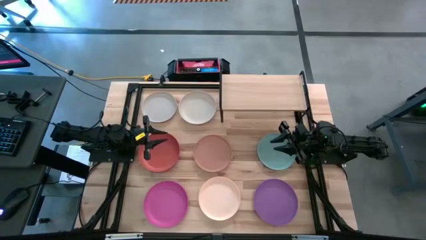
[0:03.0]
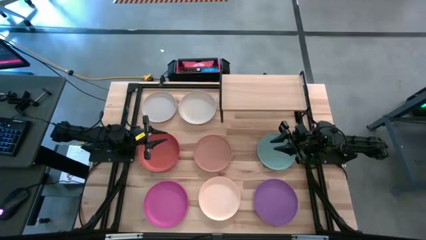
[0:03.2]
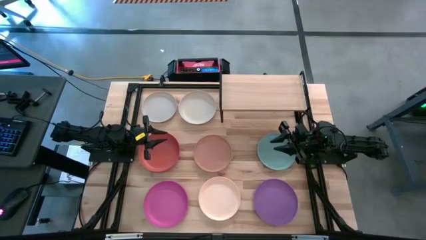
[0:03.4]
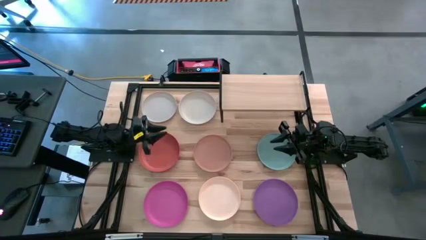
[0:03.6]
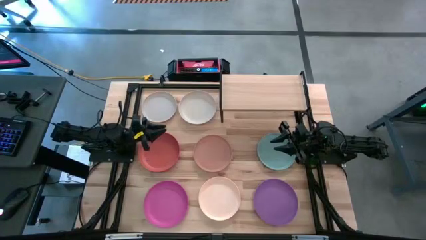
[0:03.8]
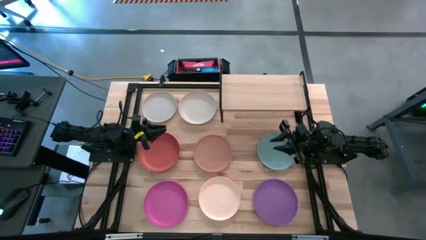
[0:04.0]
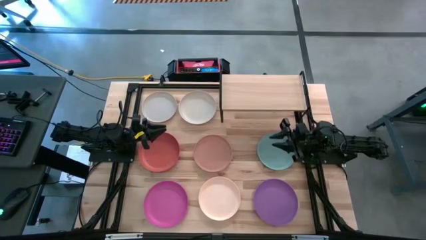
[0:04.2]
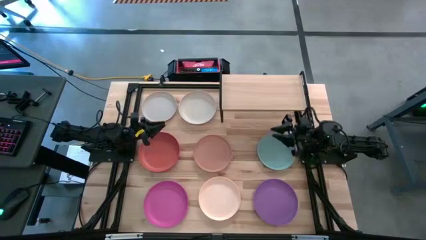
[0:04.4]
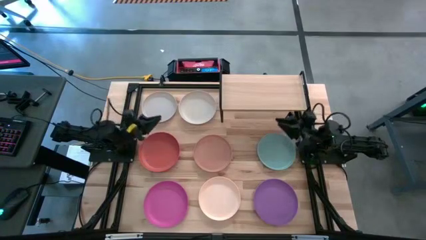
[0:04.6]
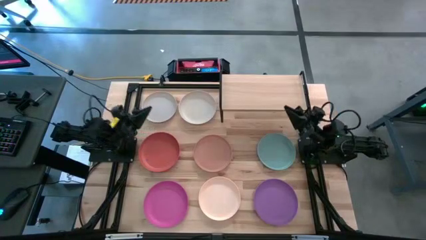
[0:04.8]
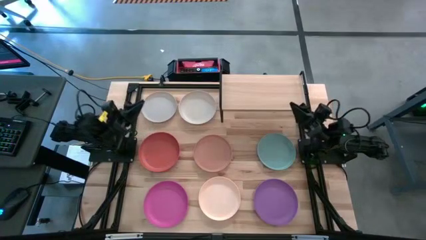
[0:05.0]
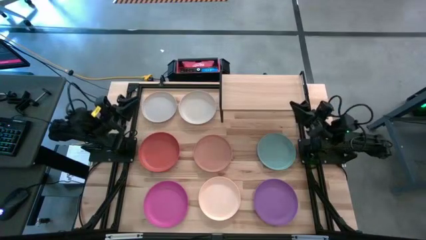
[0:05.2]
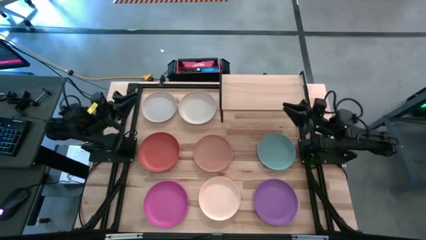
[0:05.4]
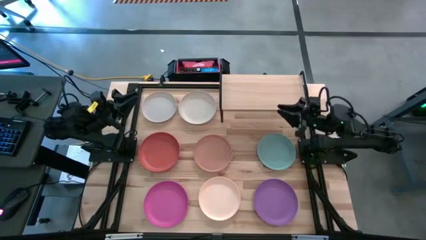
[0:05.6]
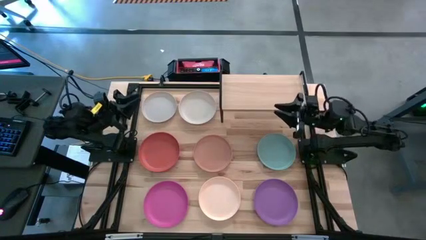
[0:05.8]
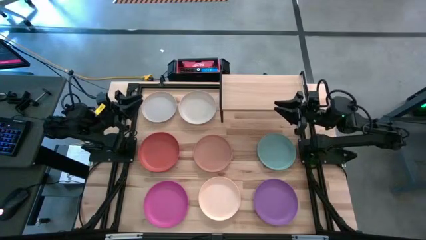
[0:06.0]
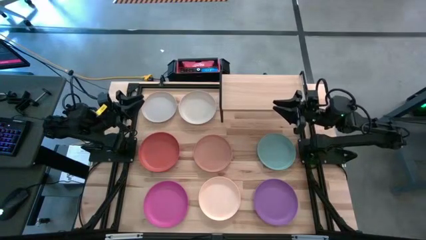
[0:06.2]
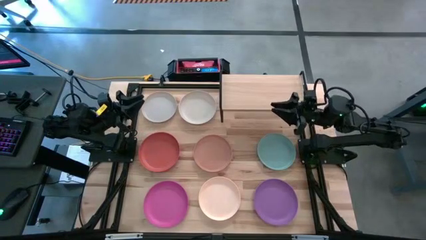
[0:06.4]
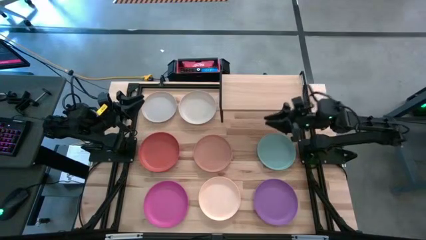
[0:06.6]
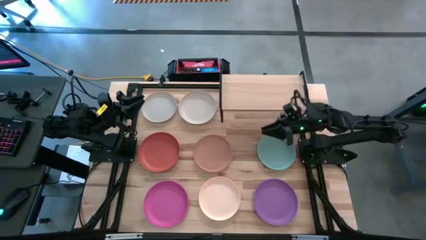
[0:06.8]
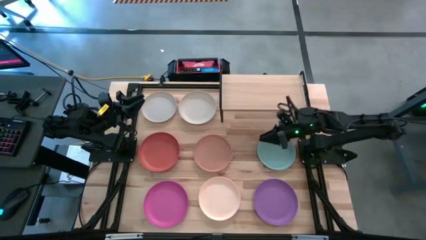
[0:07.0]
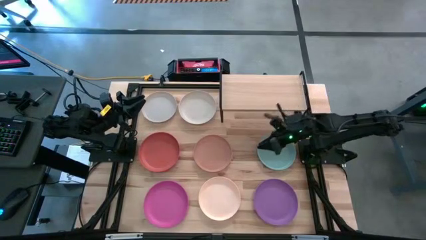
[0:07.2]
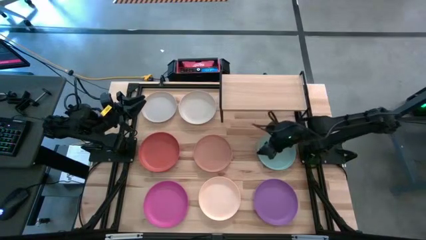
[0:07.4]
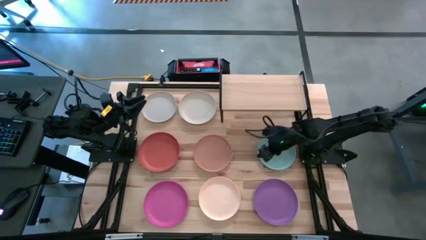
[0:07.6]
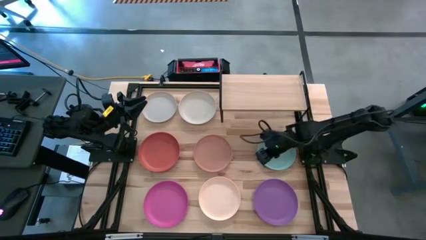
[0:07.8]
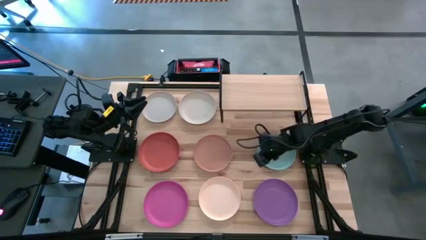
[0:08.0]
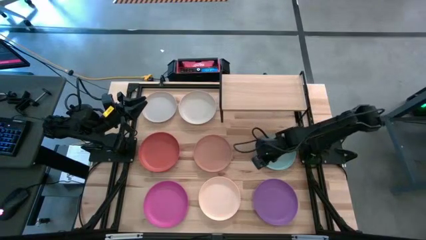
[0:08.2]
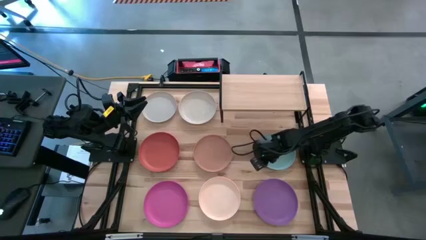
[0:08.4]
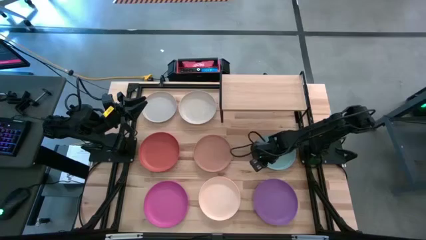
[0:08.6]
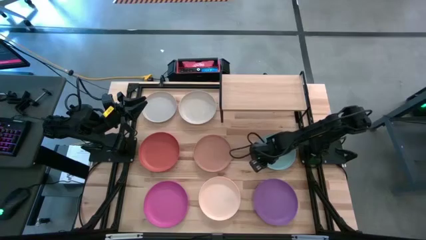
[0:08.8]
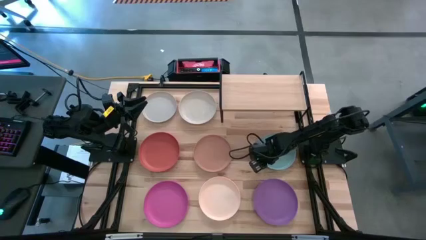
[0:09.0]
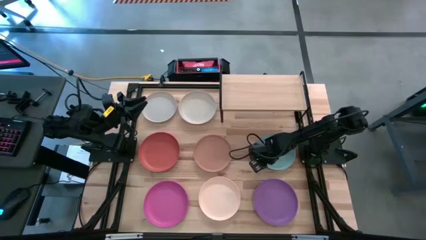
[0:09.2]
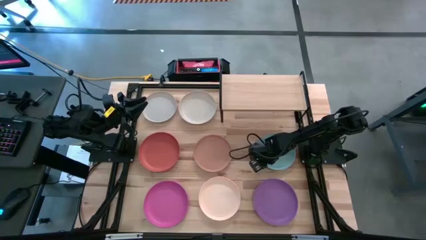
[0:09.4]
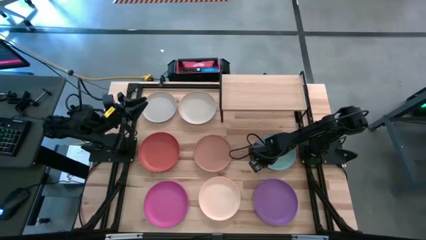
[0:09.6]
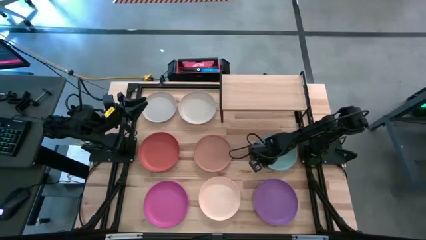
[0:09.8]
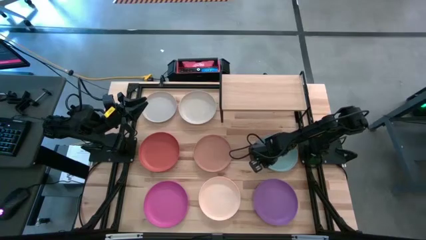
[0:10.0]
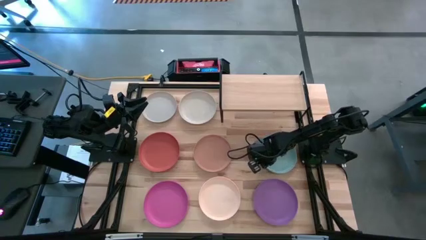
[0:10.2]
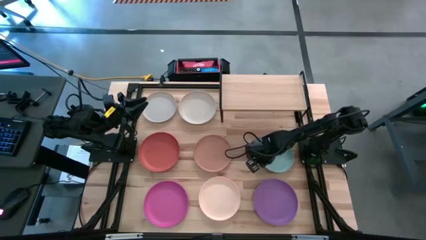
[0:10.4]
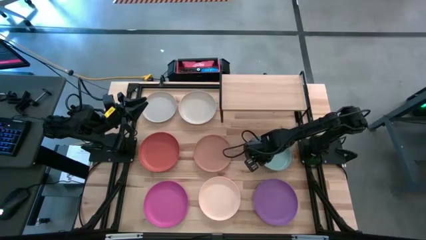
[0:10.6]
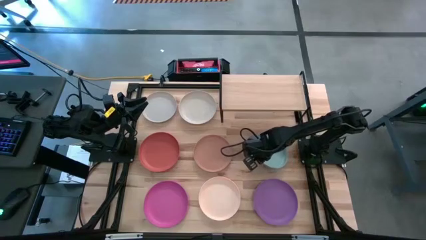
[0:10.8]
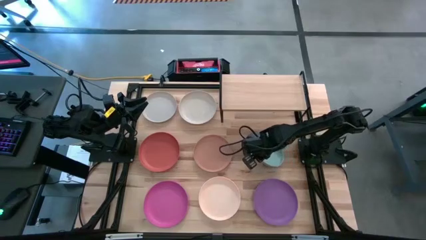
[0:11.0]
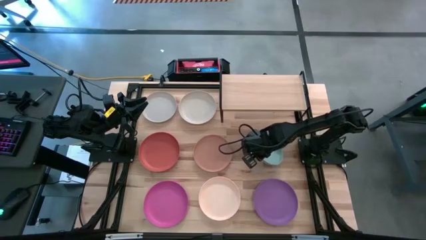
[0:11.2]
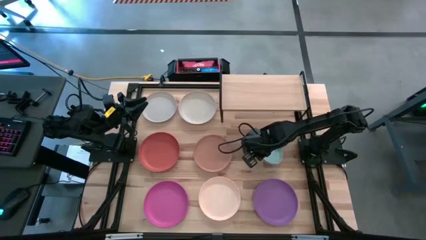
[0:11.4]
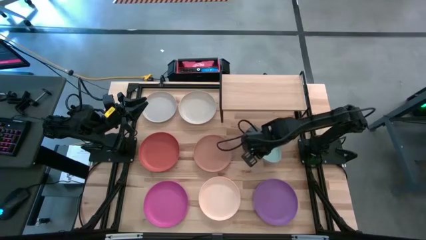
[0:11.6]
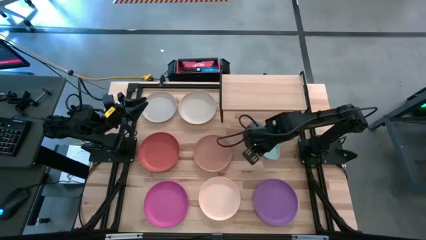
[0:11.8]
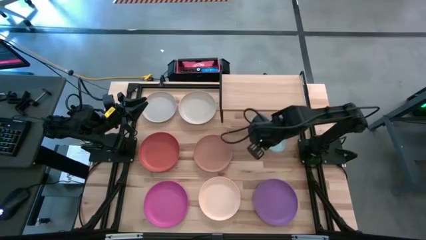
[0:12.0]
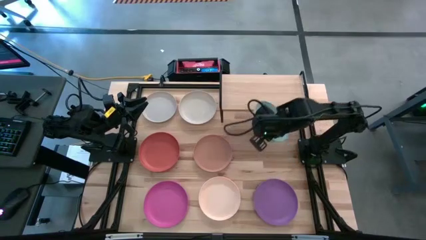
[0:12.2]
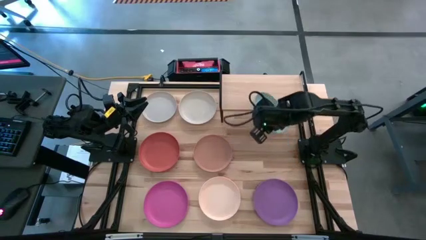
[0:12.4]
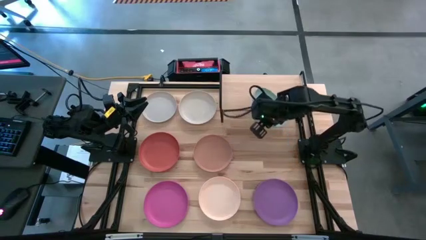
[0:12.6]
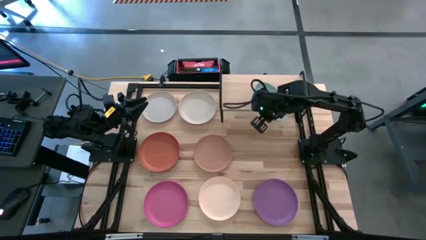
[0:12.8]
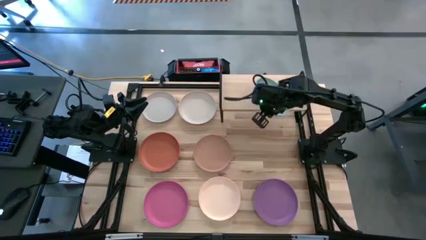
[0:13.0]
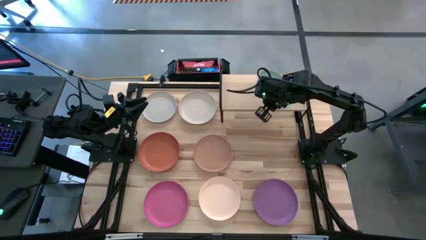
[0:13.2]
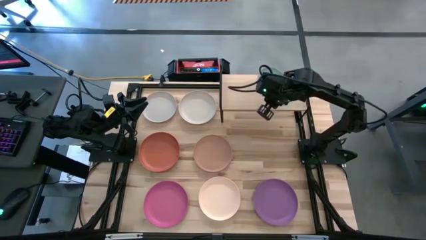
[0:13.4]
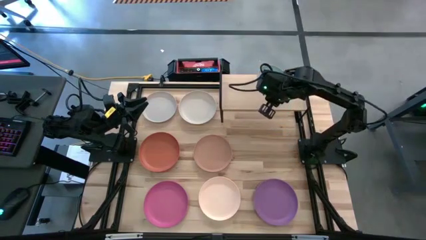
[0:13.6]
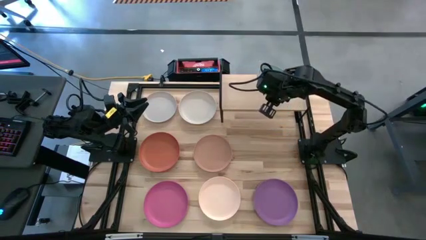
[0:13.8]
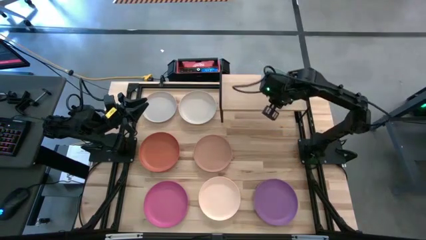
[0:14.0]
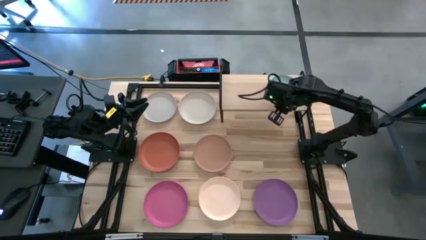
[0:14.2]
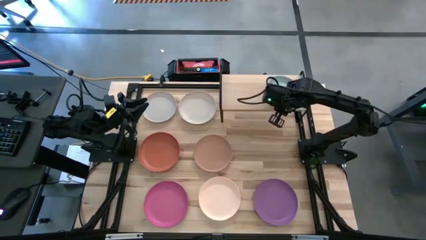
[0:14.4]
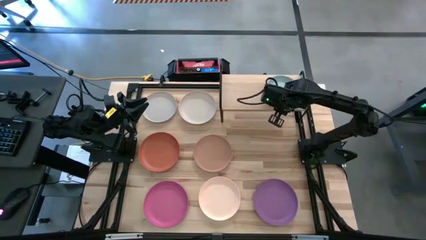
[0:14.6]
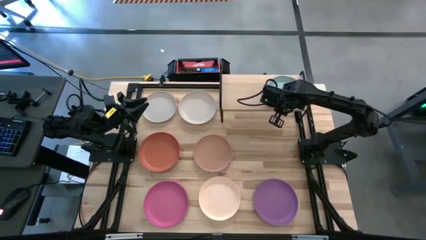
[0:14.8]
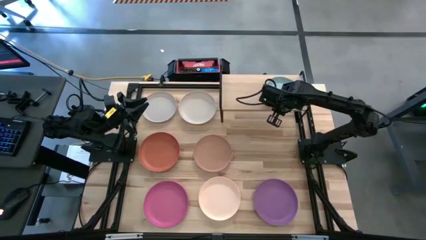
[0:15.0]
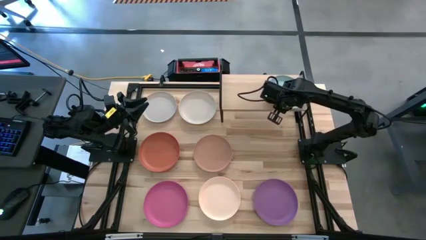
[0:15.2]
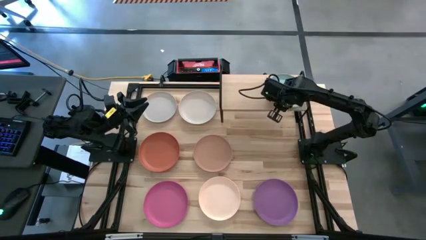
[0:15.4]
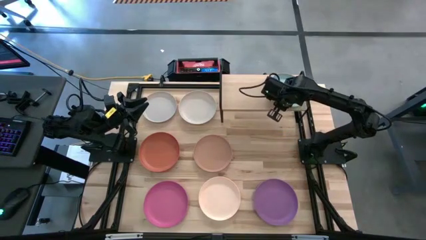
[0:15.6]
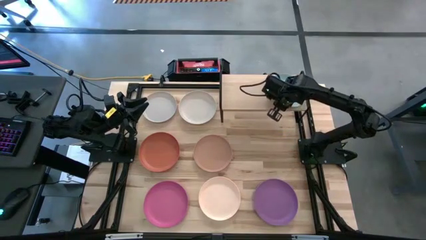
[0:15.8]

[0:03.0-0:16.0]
Task: Place and stack plates onto a shelf
Put the blue plate on the shelf
